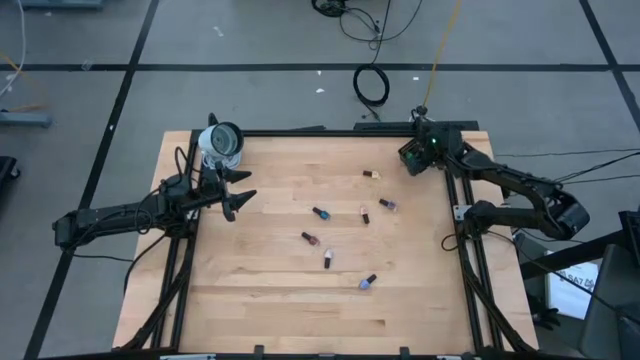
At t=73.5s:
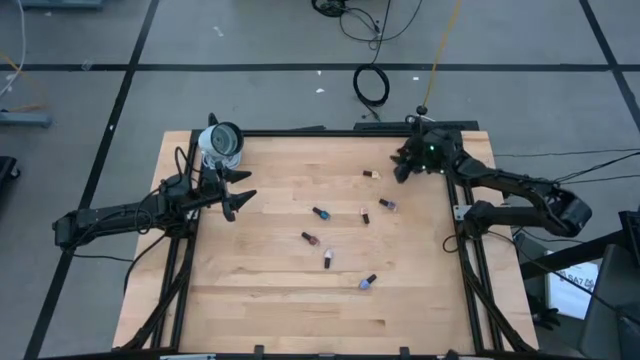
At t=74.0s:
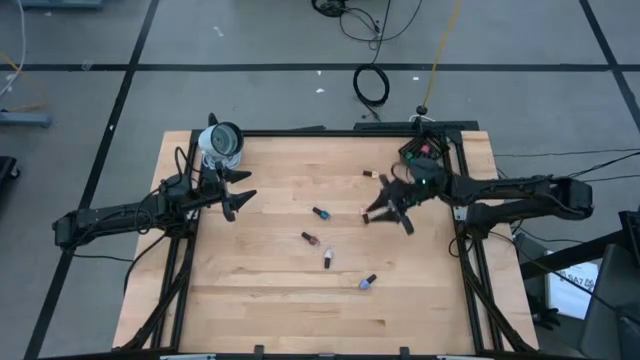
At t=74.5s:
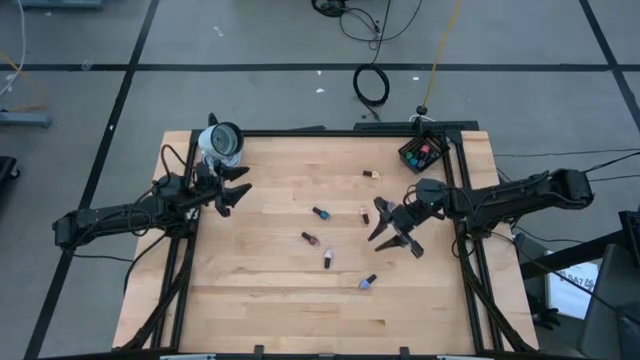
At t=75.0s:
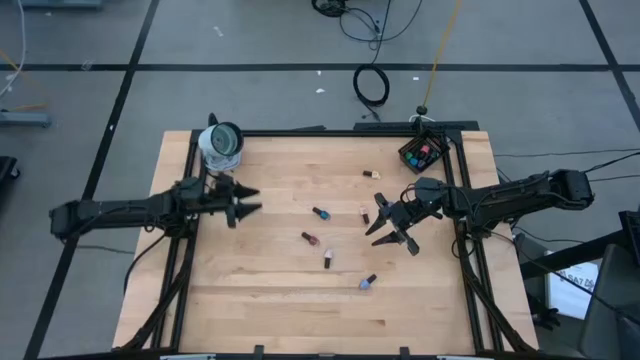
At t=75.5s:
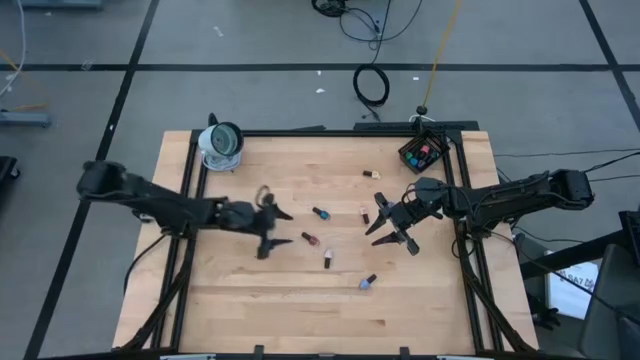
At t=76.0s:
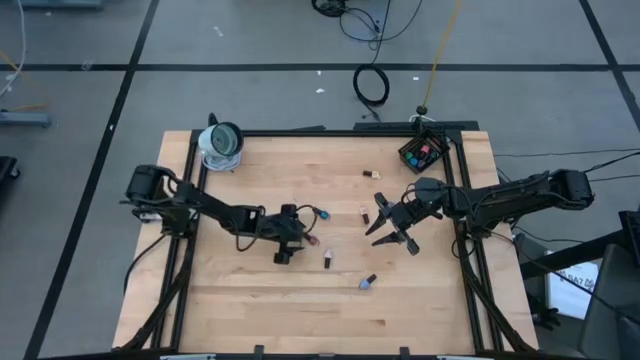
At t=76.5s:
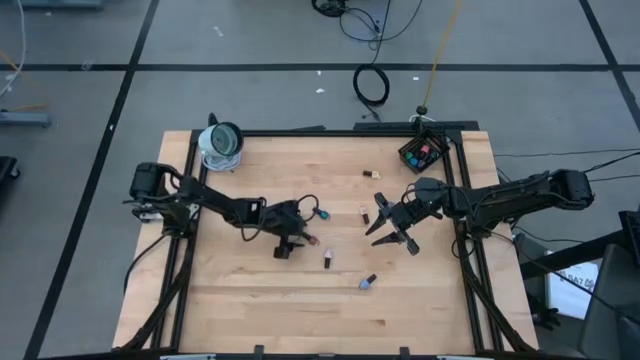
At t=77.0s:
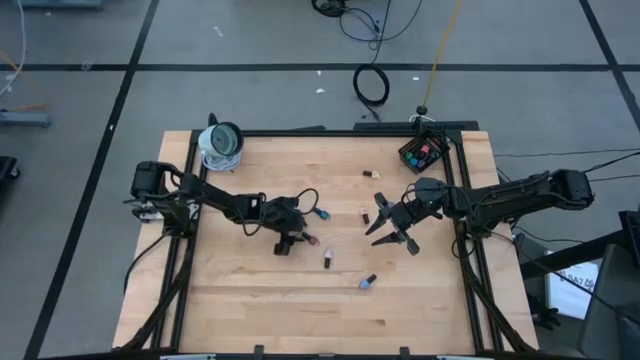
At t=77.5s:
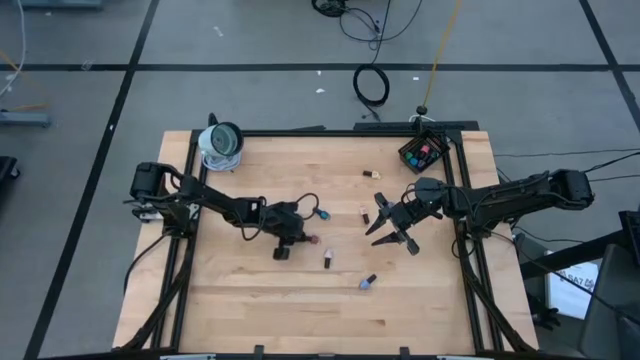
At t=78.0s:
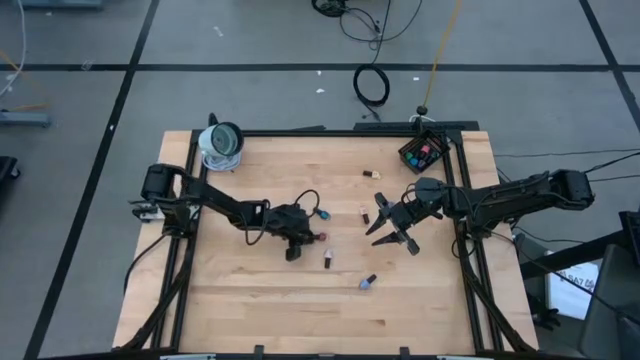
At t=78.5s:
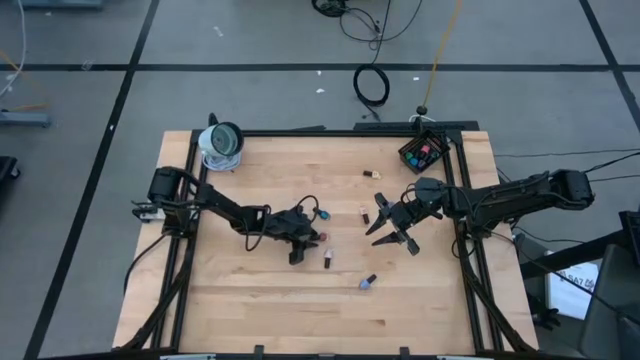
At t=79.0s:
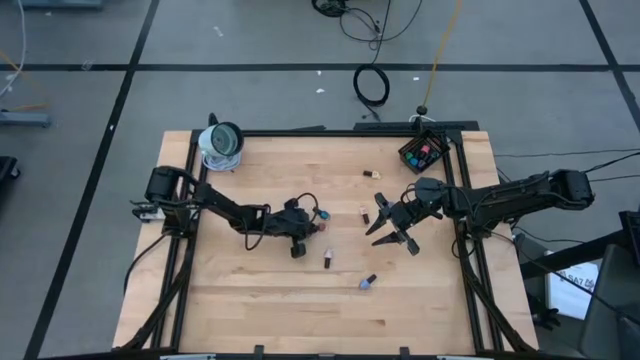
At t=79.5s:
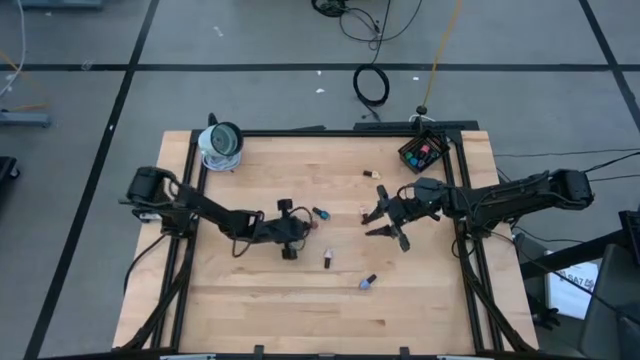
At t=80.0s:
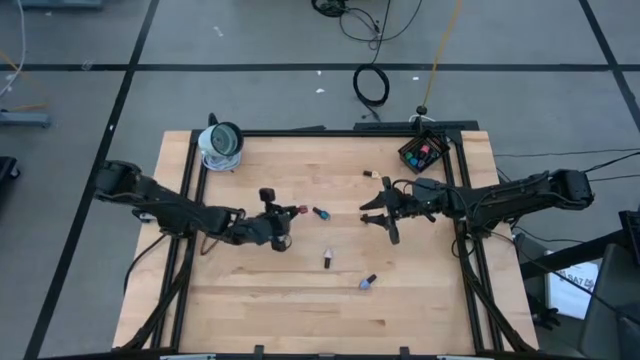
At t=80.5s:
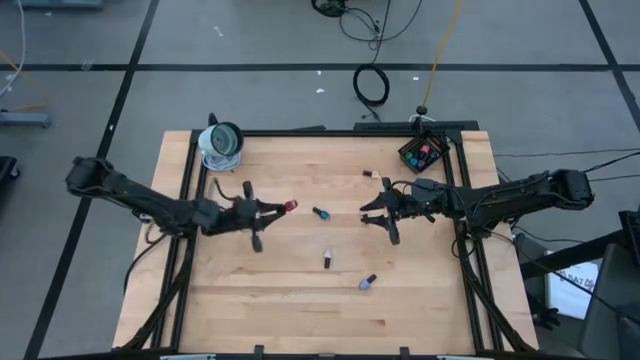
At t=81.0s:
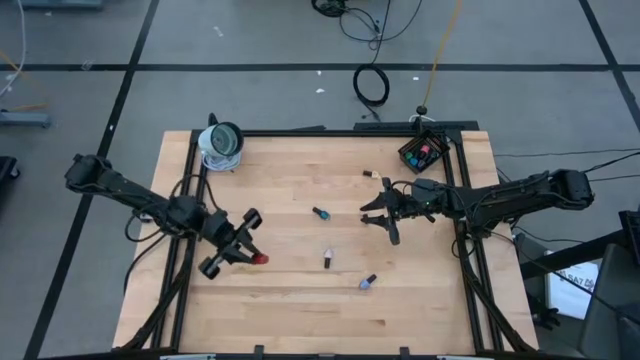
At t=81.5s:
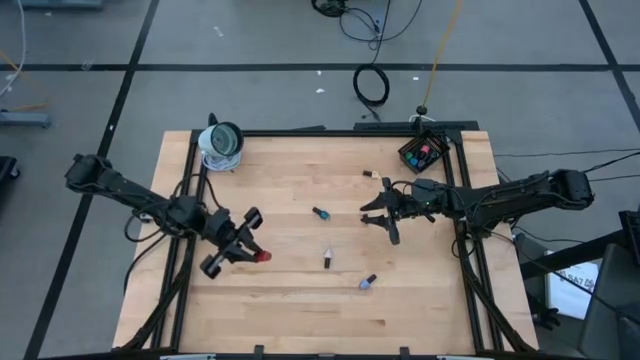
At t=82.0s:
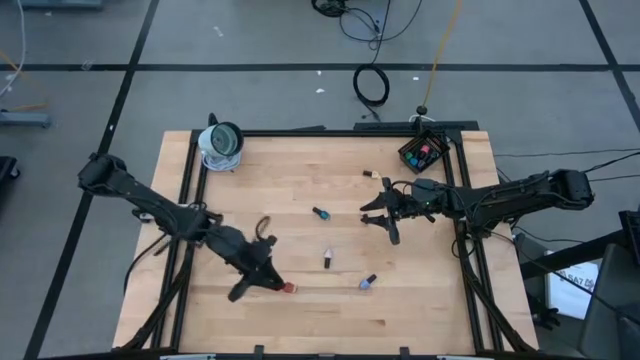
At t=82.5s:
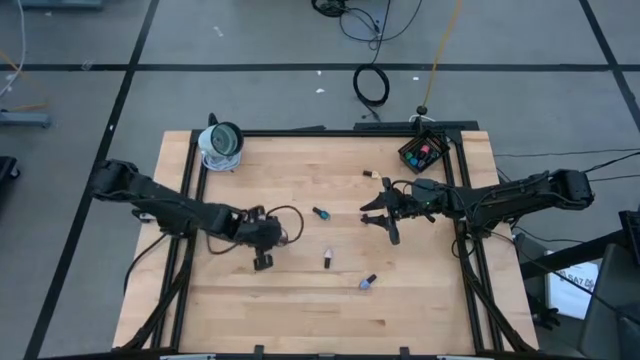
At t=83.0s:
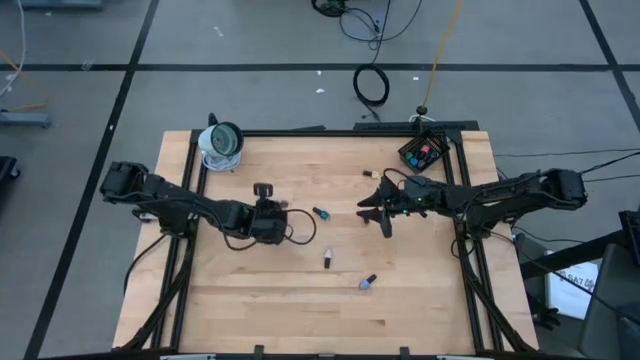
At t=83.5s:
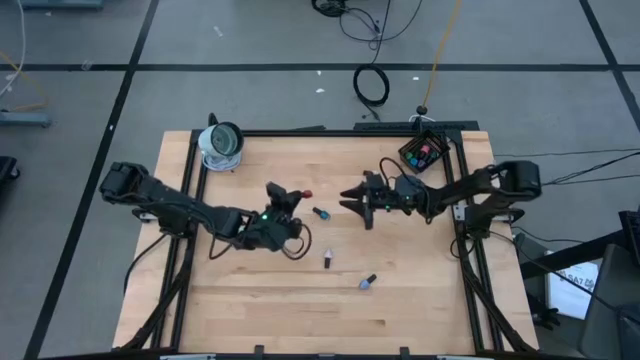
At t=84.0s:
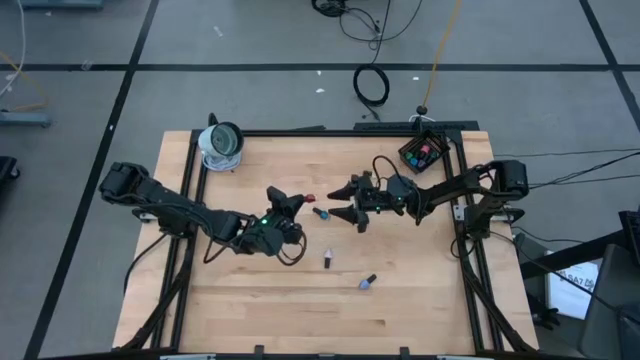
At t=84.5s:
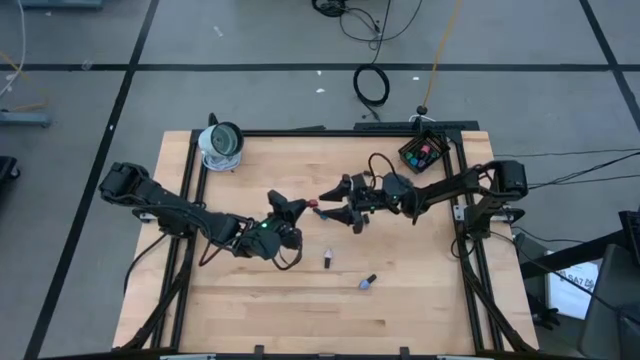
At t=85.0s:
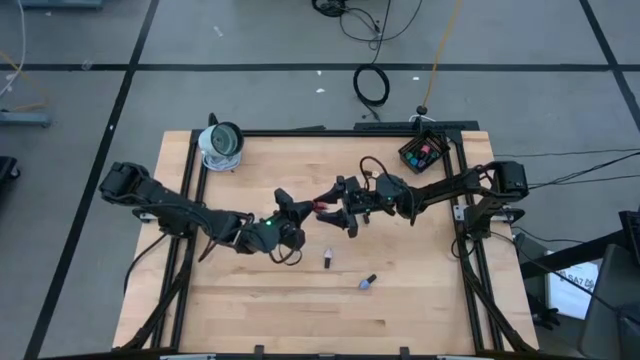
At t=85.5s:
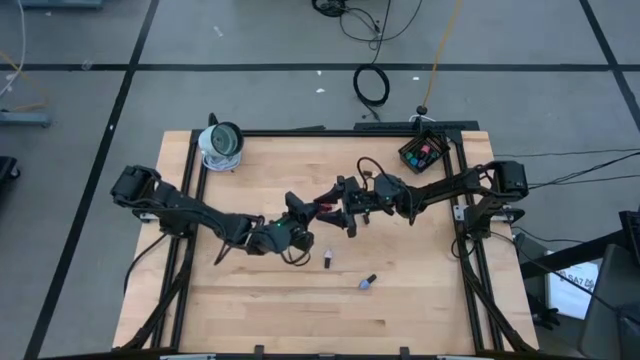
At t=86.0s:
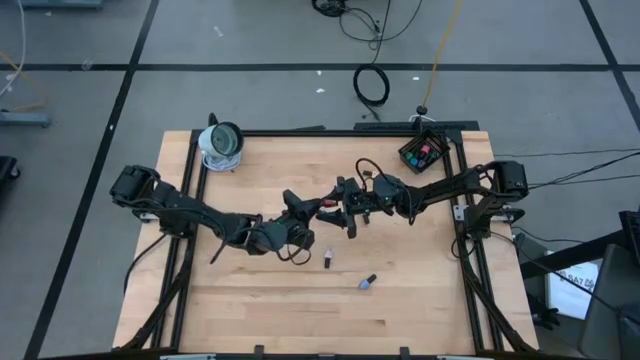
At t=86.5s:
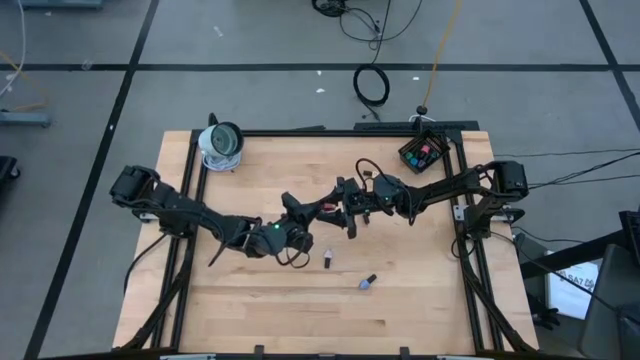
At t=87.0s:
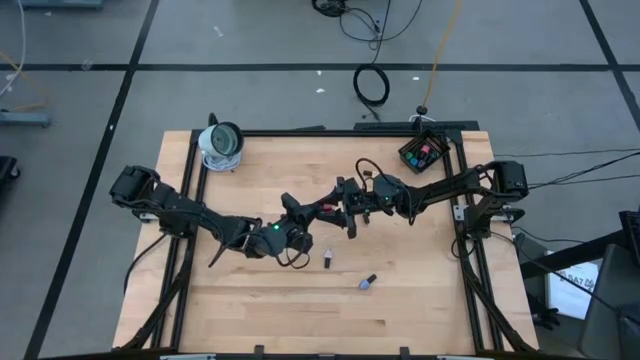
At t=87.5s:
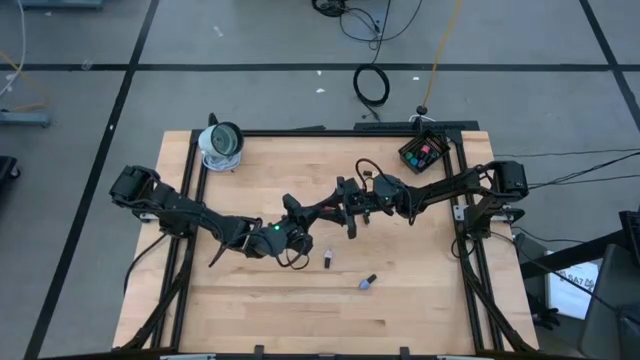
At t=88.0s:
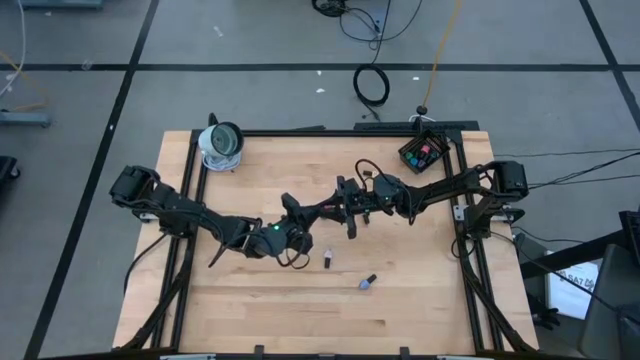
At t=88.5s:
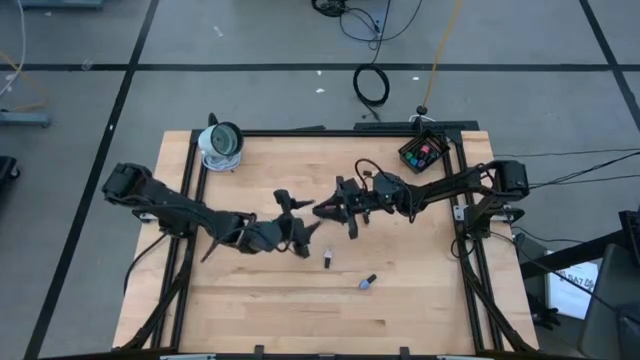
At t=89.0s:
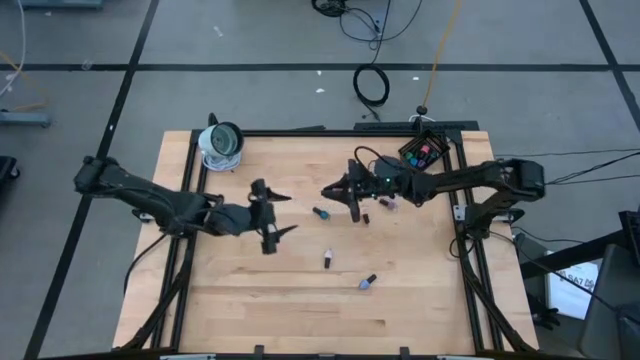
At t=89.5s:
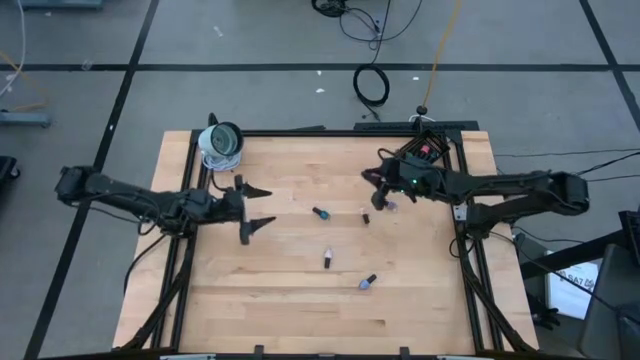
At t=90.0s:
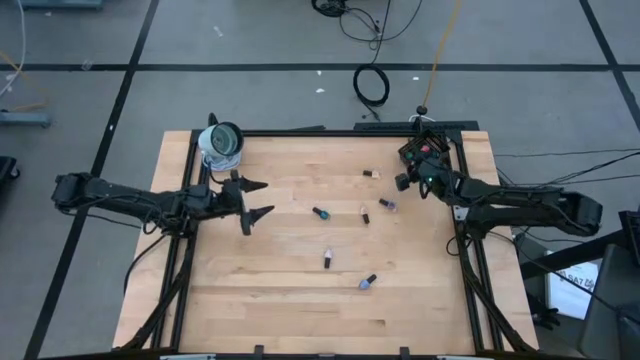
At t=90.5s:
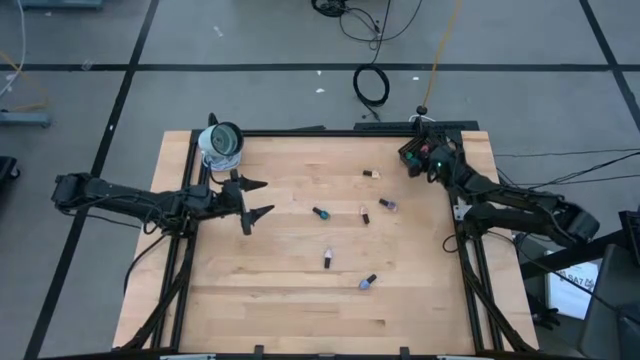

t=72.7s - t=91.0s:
Task: Pick & Place Nail Polish
Put the red nail polish into the black bin

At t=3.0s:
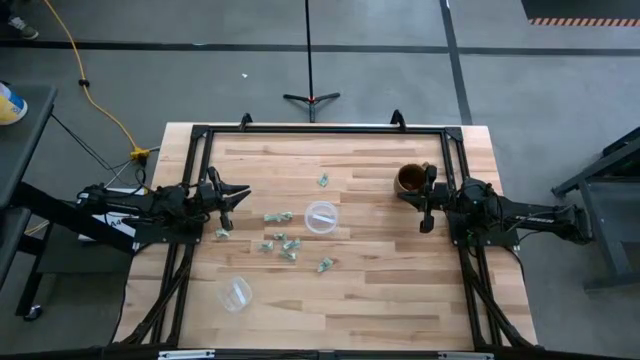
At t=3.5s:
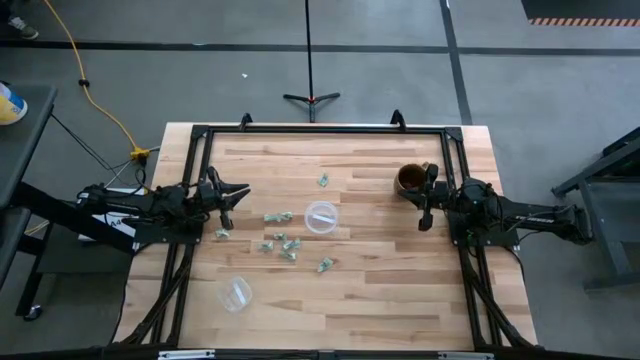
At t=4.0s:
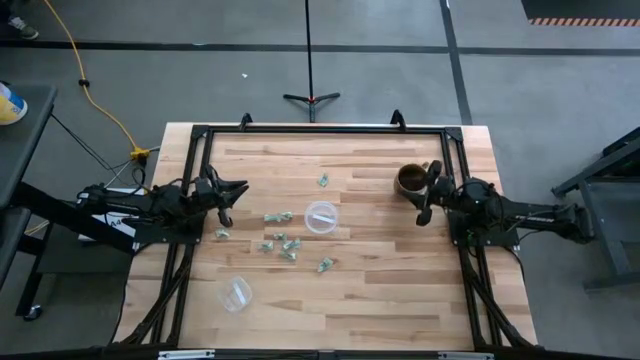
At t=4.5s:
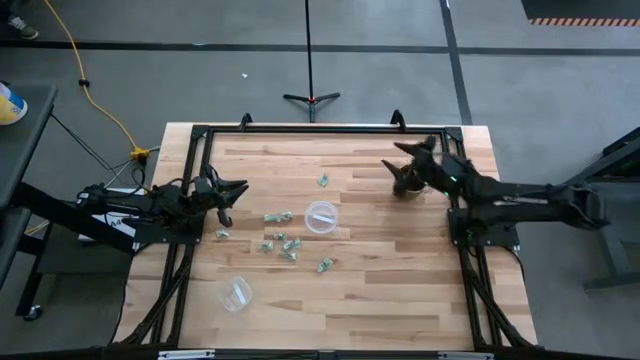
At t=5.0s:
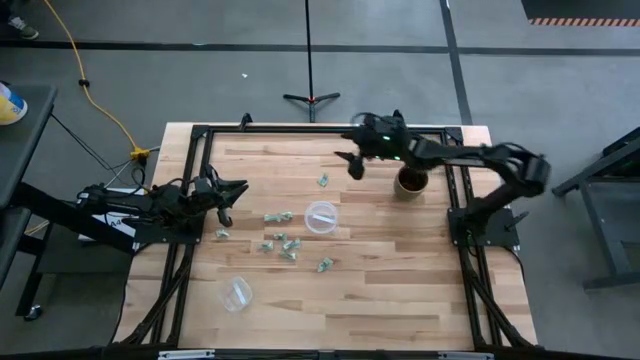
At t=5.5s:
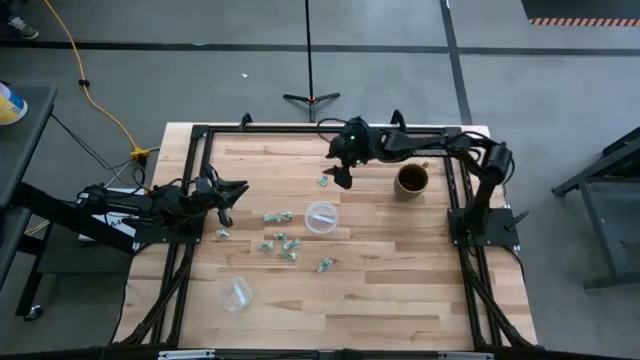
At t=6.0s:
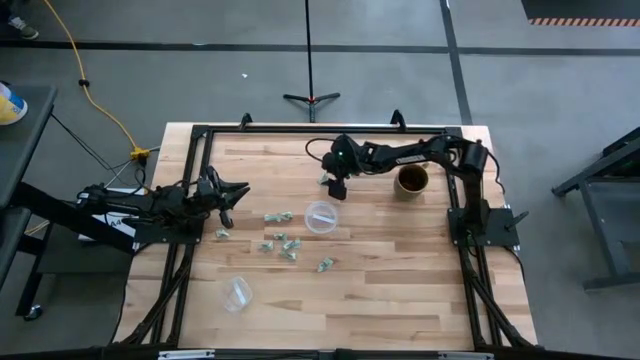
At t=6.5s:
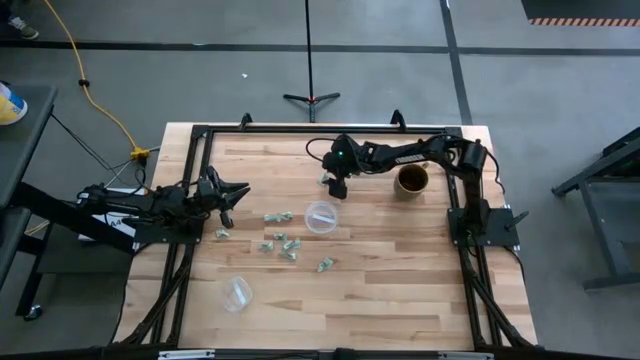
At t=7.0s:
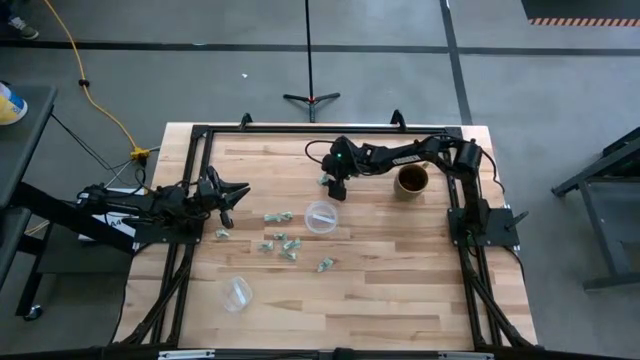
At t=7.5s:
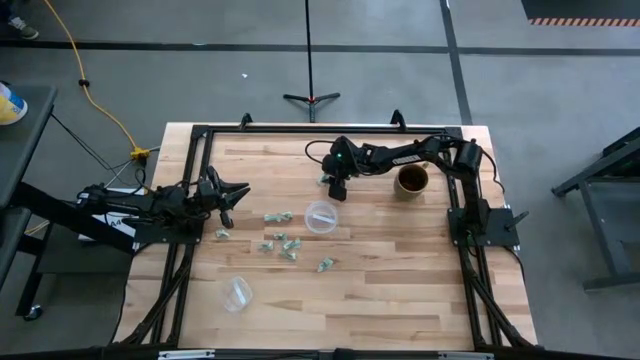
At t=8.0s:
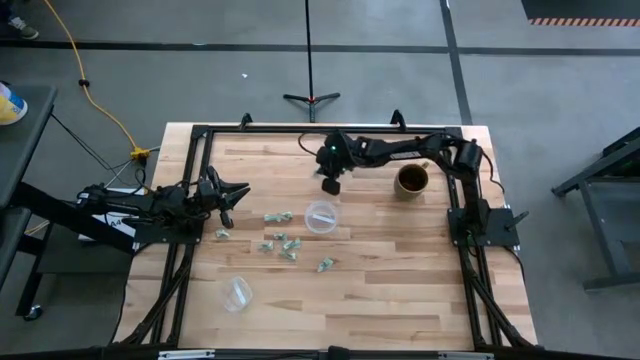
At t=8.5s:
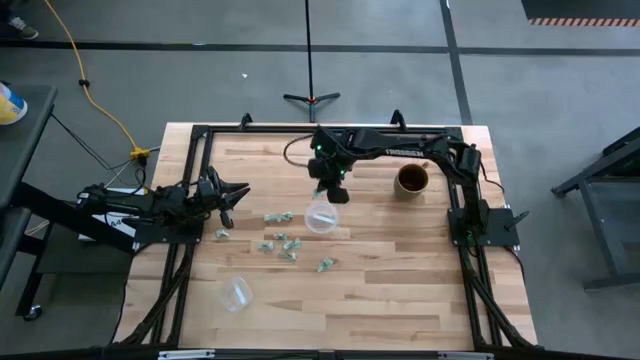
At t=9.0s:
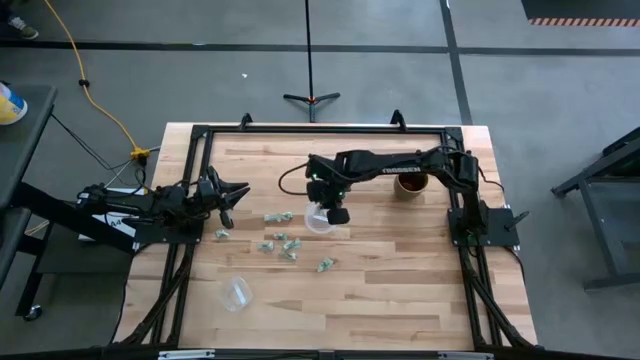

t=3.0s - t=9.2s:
Task: Pick and place items into bin
Put the green stevia packet into the top transparent bin
